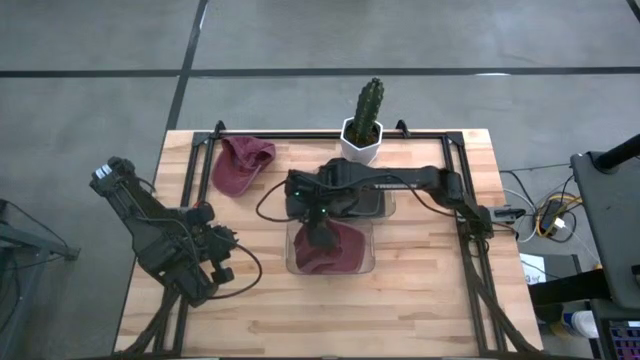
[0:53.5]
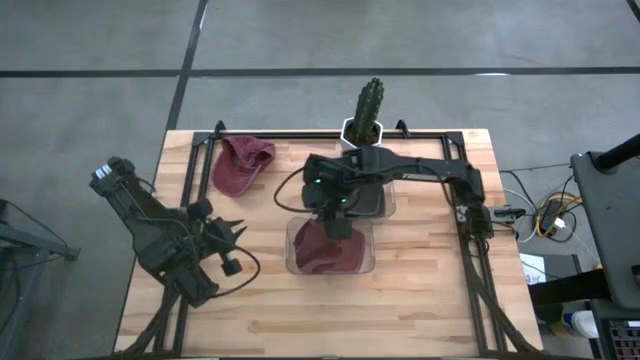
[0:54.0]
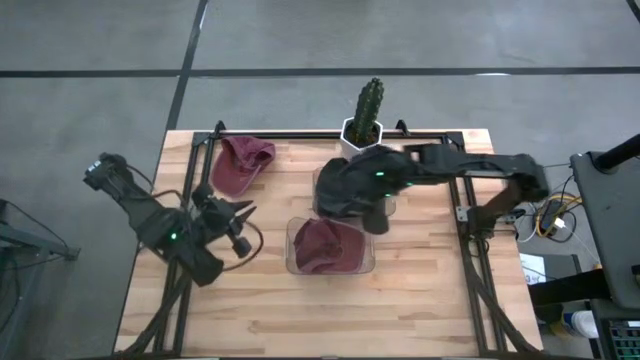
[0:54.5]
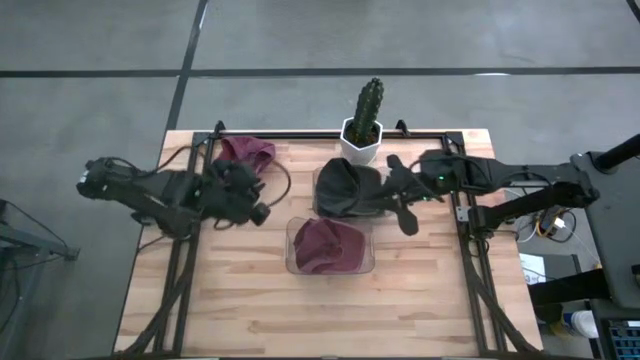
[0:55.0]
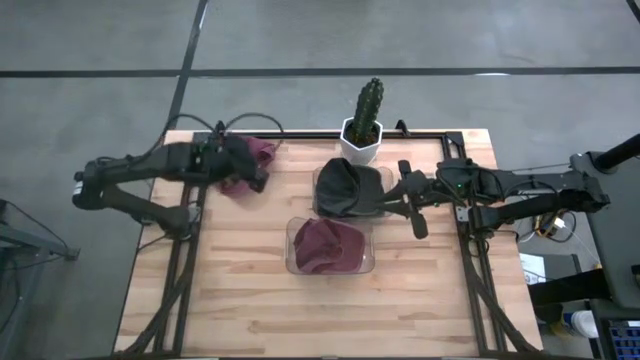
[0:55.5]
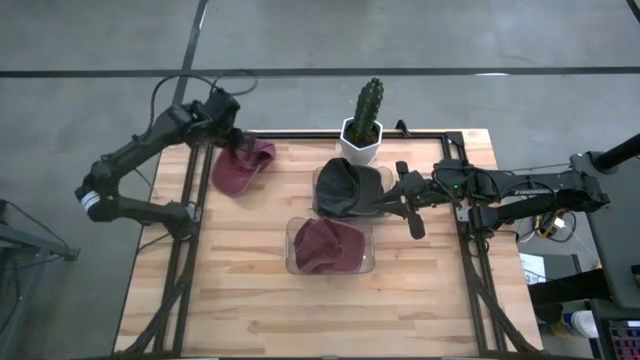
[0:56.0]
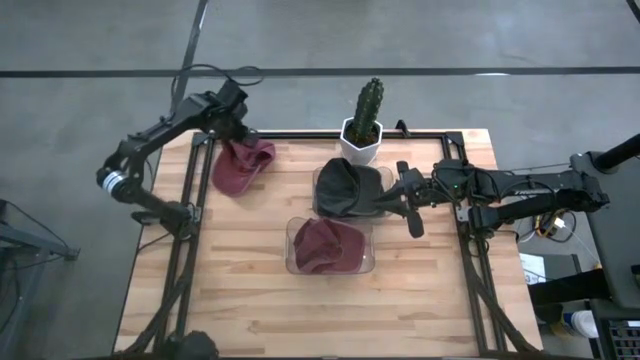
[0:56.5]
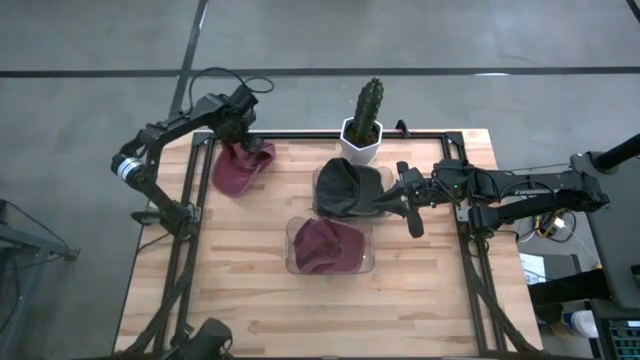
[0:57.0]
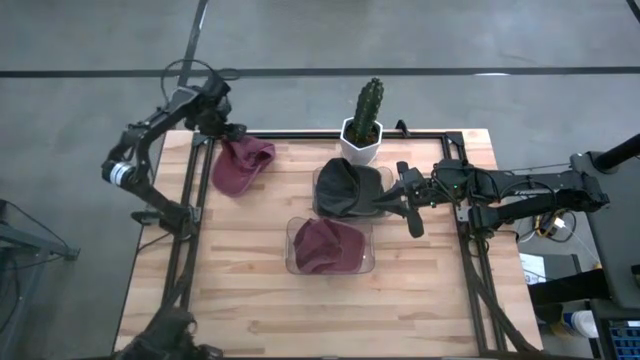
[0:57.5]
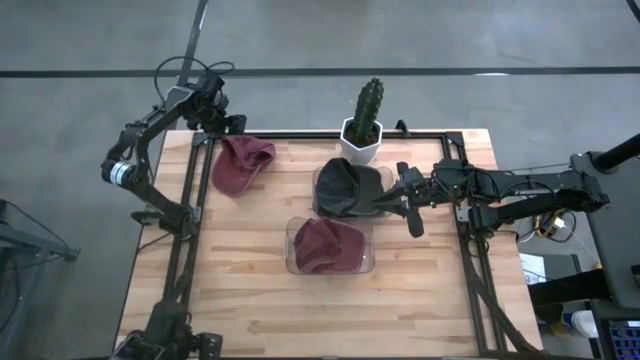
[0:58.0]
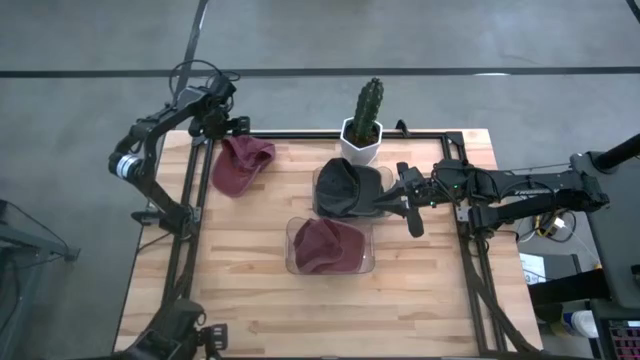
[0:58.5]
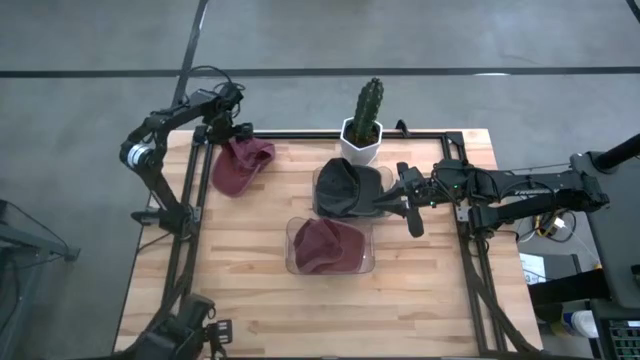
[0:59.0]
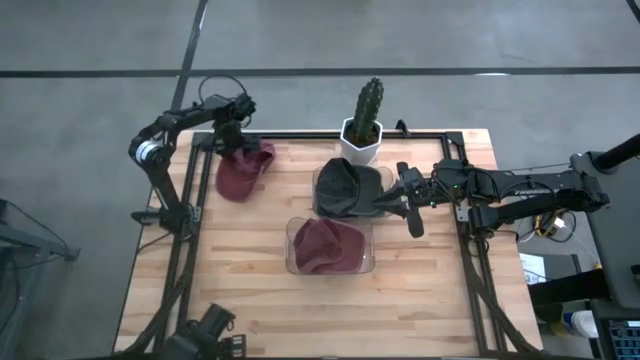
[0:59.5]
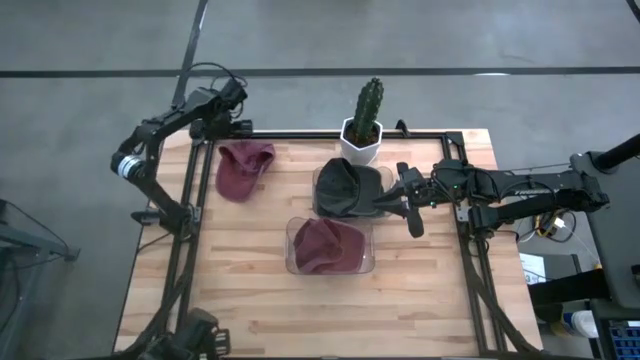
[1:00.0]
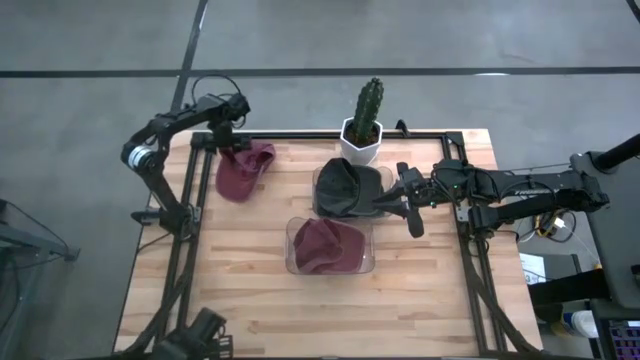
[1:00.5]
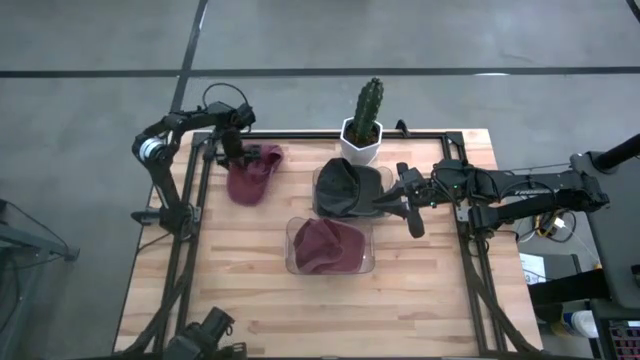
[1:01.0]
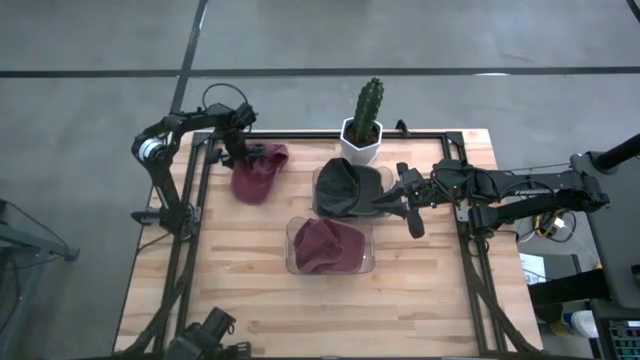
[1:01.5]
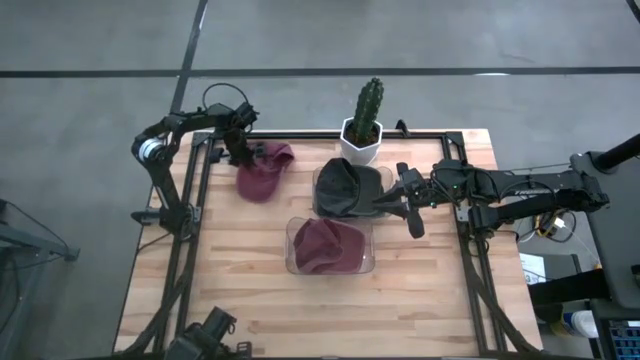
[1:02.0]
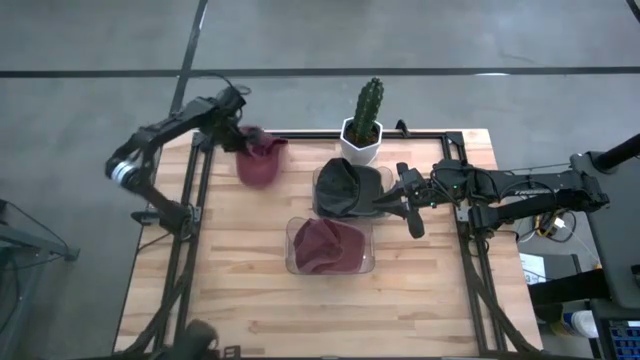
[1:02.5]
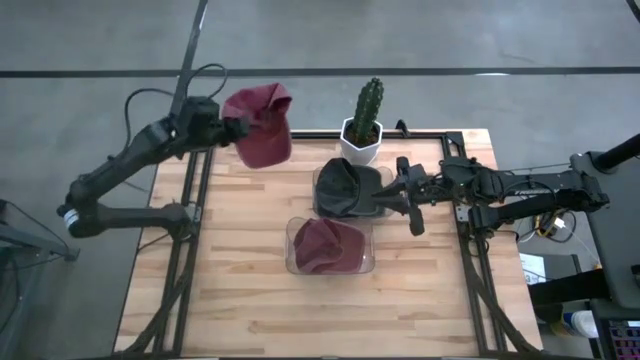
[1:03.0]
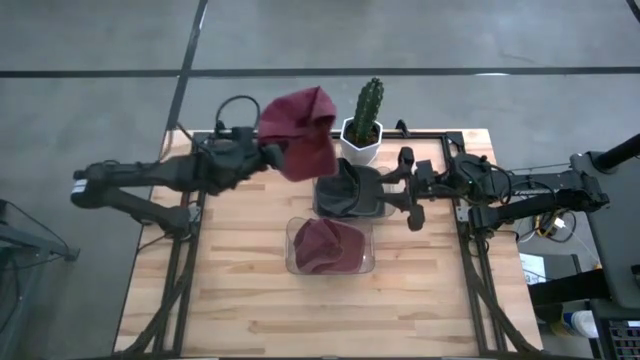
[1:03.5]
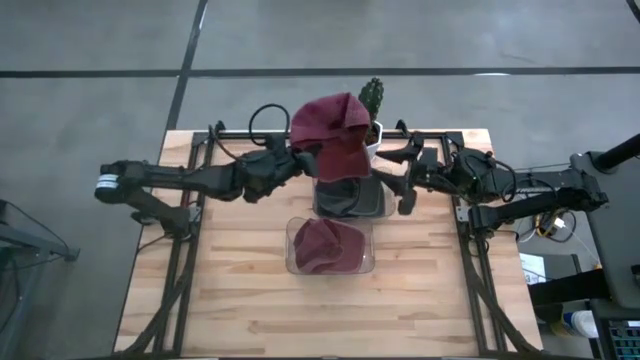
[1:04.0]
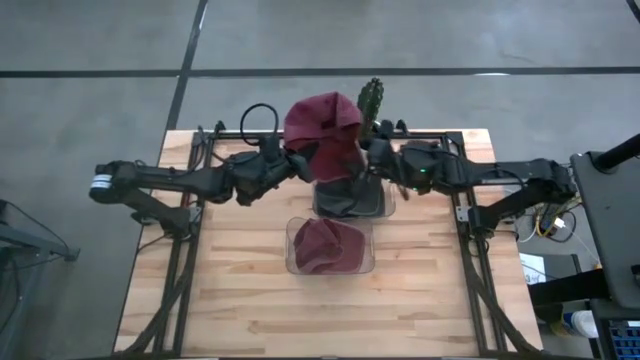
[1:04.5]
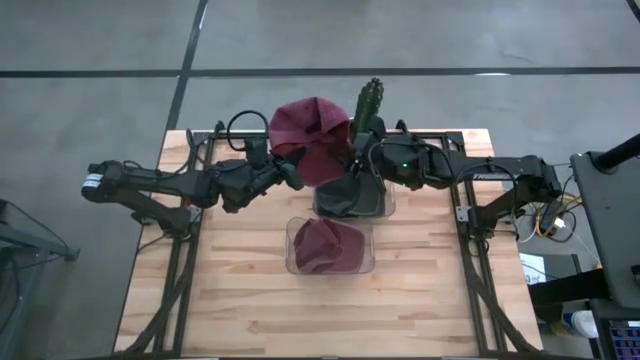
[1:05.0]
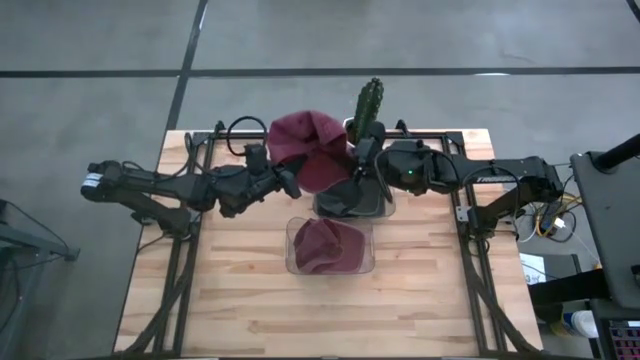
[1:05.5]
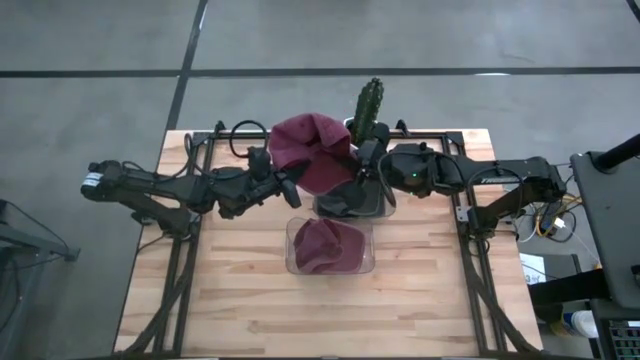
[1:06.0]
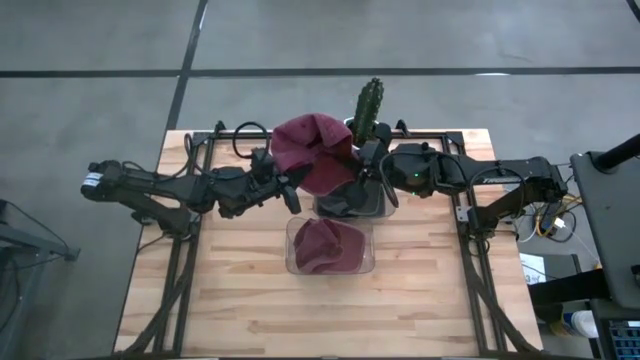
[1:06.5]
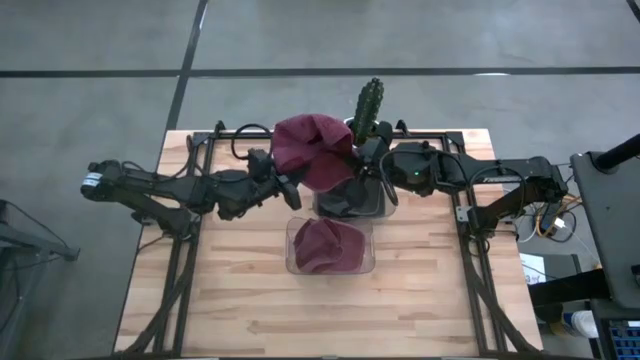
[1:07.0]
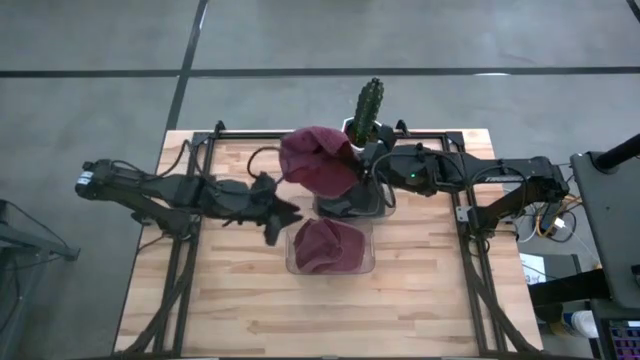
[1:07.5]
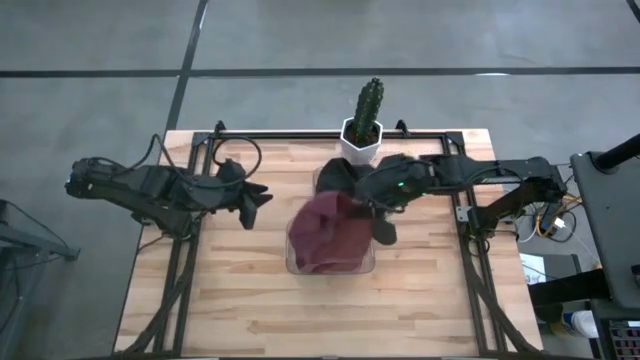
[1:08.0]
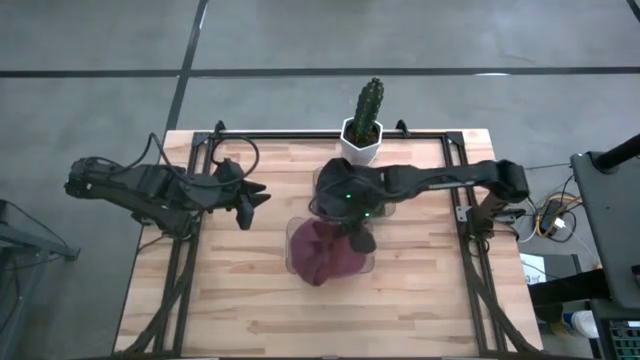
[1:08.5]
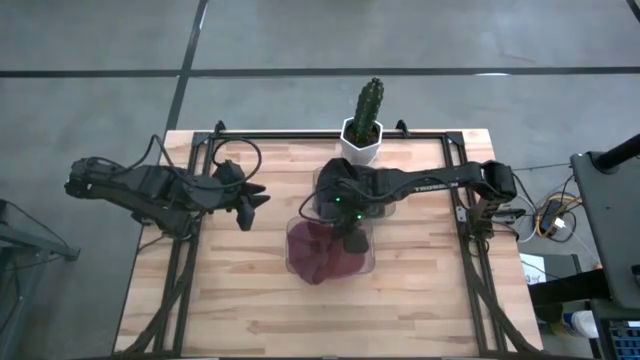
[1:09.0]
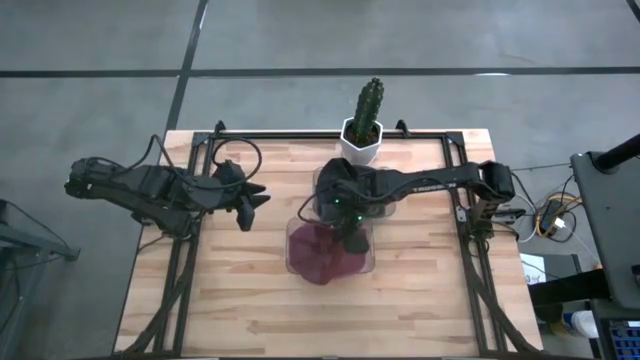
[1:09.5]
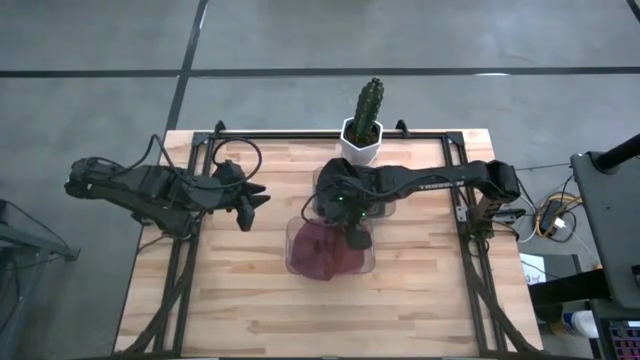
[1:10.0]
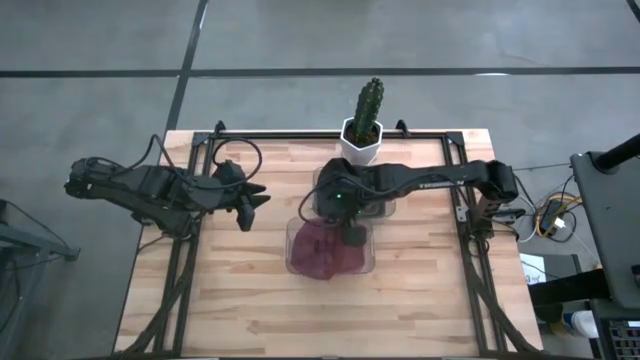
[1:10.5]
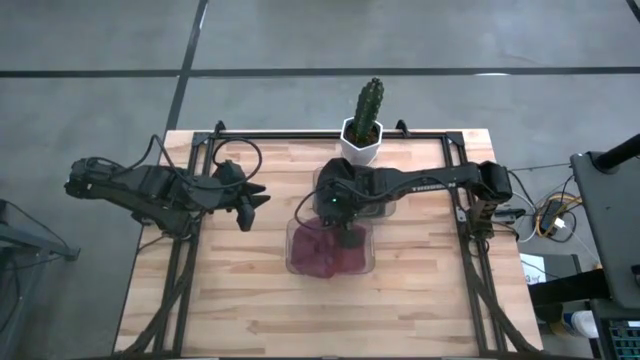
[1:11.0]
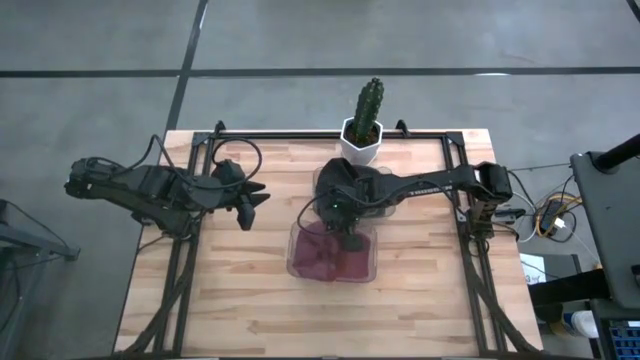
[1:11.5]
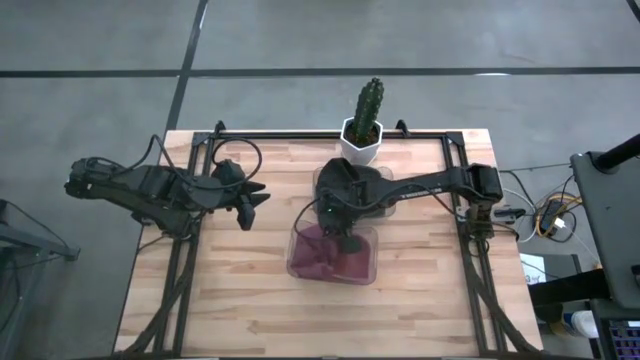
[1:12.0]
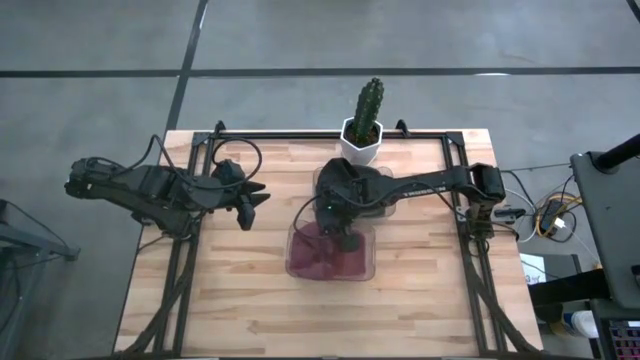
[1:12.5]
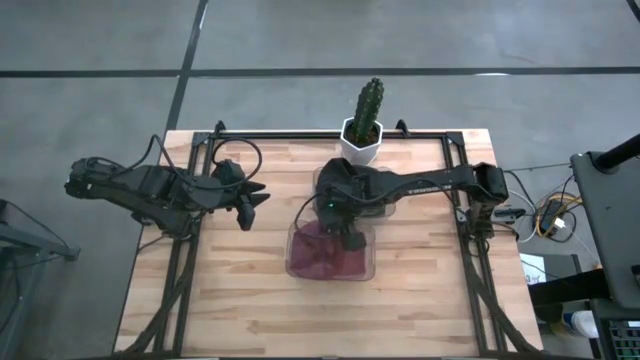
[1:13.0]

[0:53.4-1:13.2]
Task: Pick & Place hat
Put the red cap into the bottom transparent bin
